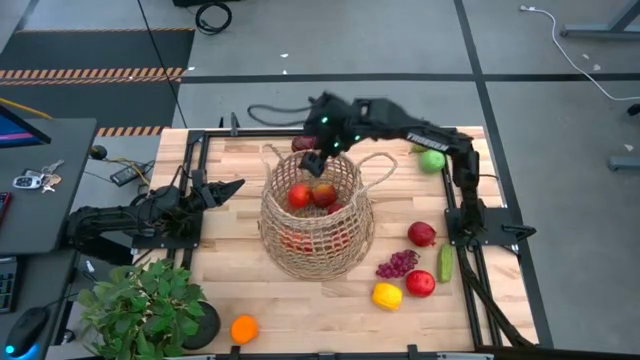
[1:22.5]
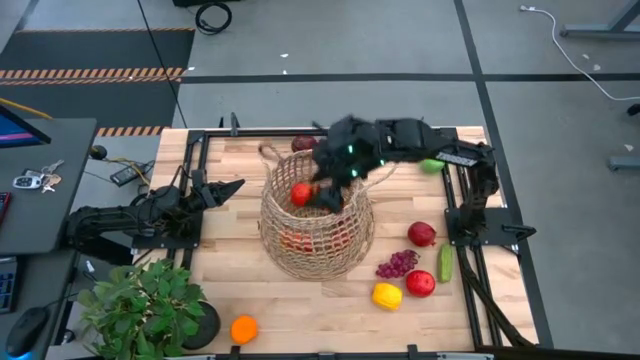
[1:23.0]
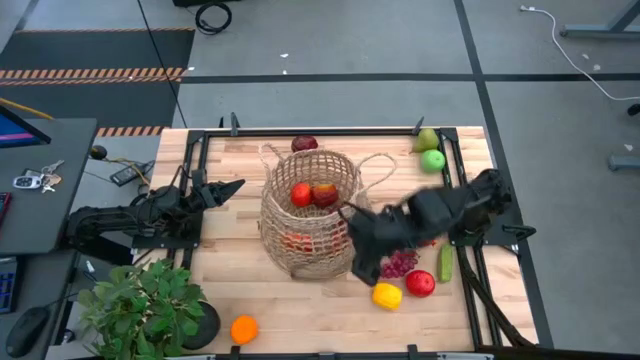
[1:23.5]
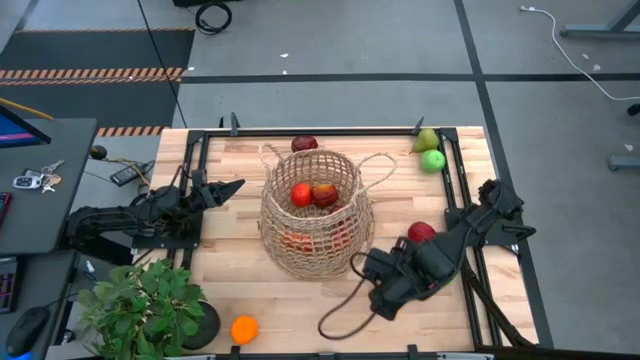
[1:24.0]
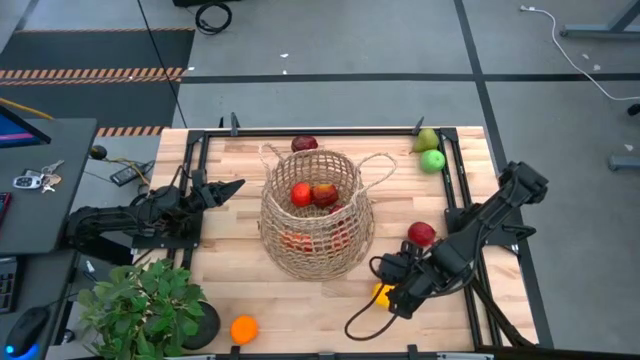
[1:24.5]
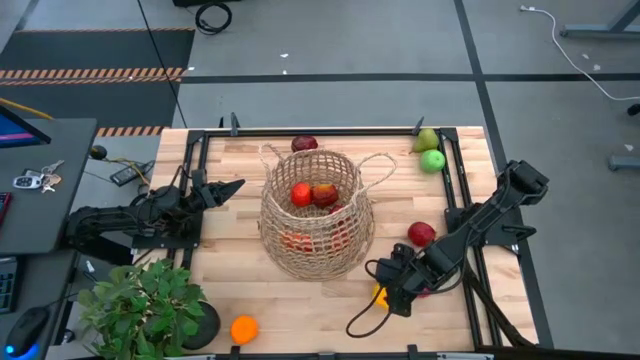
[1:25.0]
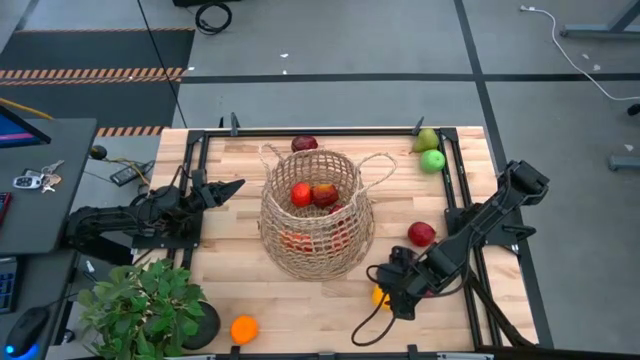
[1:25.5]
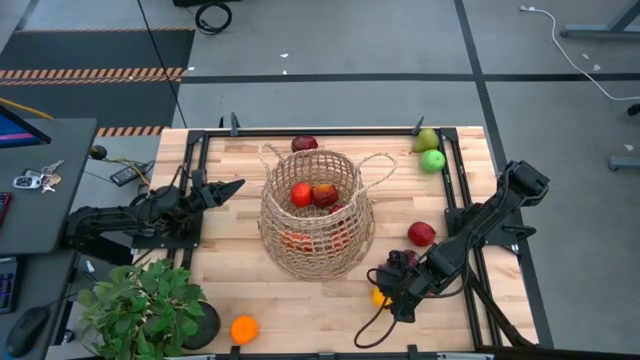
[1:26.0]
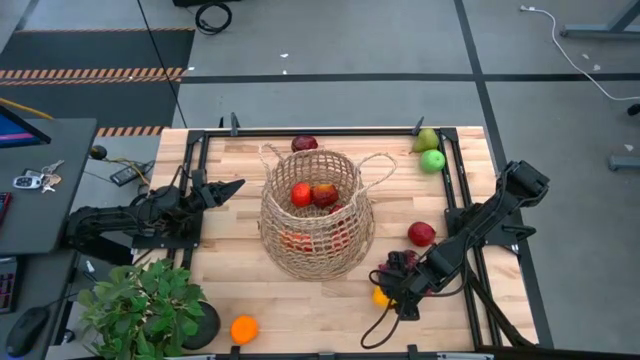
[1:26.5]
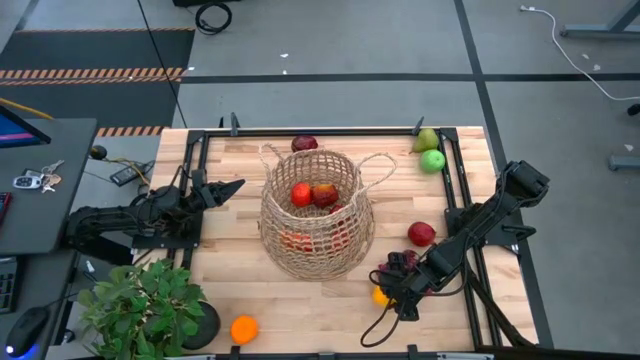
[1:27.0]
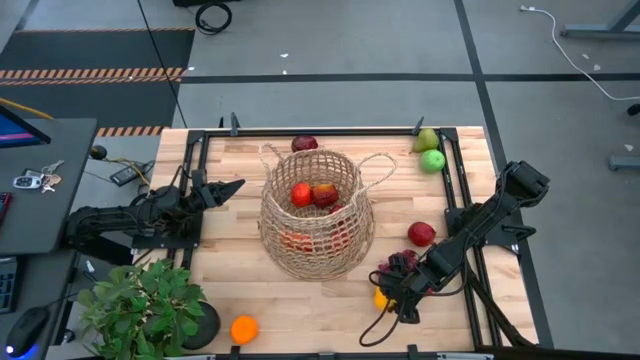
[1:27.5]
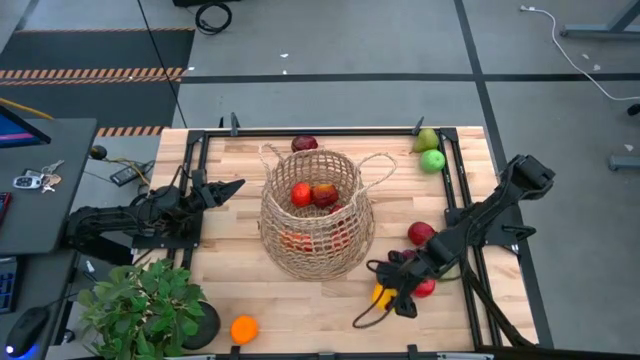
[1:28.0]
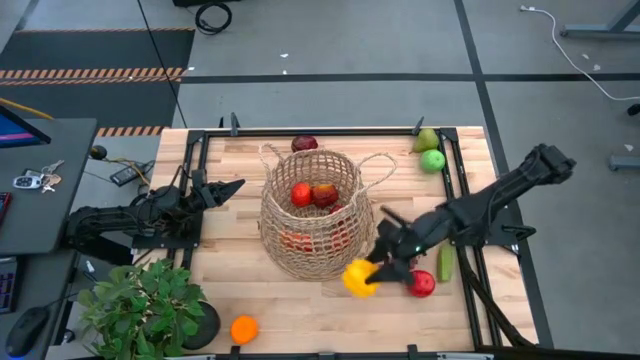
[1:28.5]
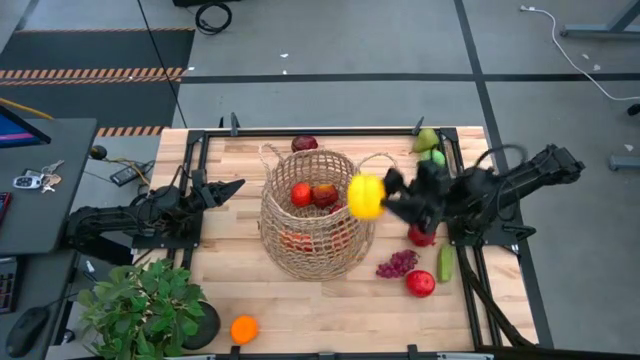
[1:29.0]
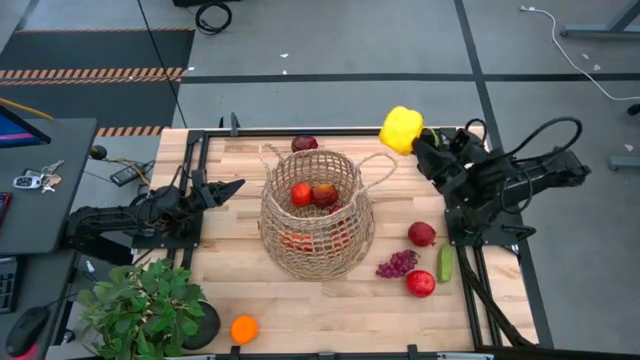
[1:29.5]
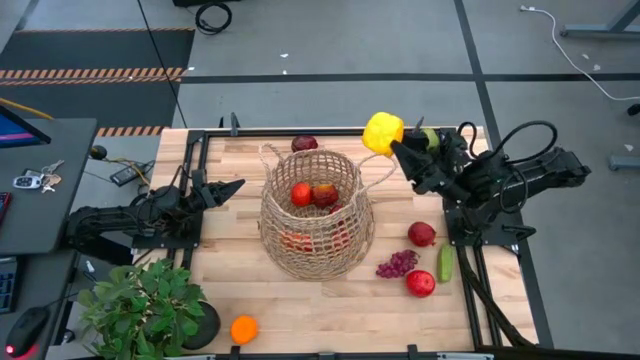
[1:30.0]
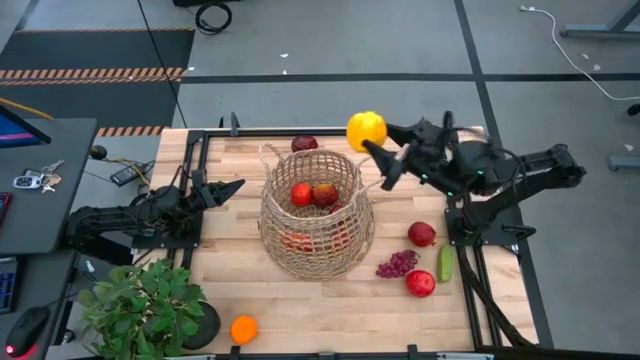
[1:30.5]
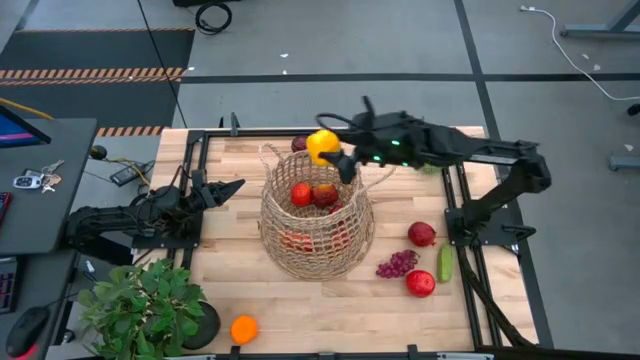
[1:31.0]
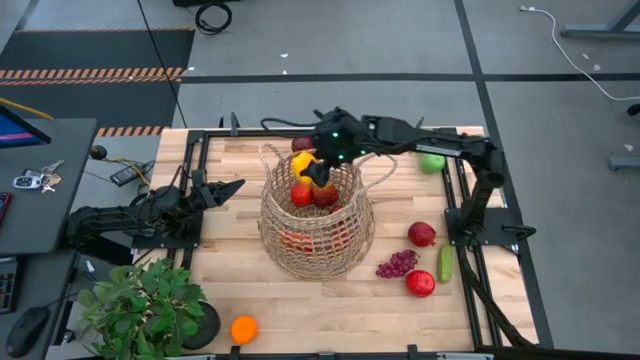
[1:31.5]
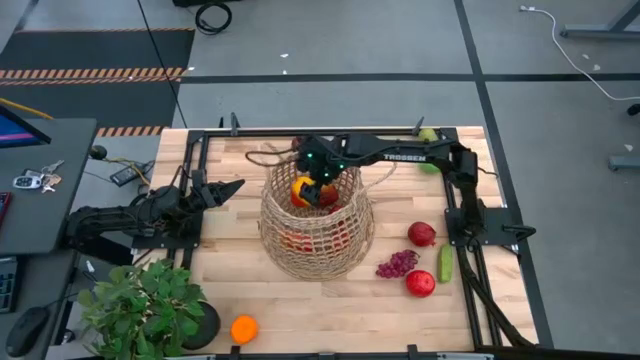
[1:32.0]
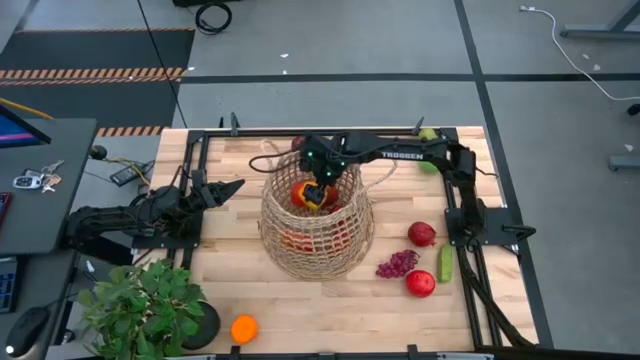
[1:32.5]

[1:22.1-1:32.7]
Task: Build produce basket
Put the yellow bell pepper into the basket

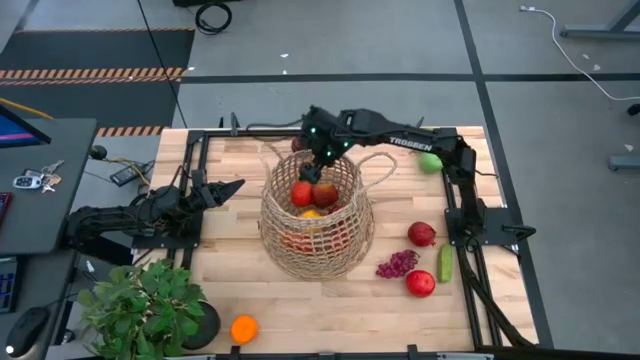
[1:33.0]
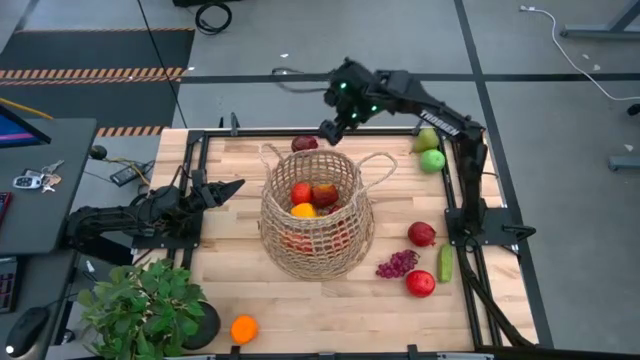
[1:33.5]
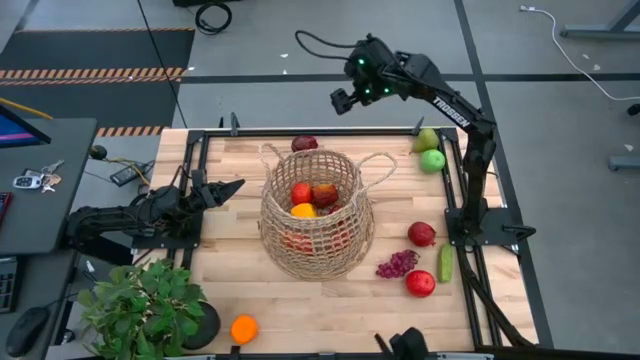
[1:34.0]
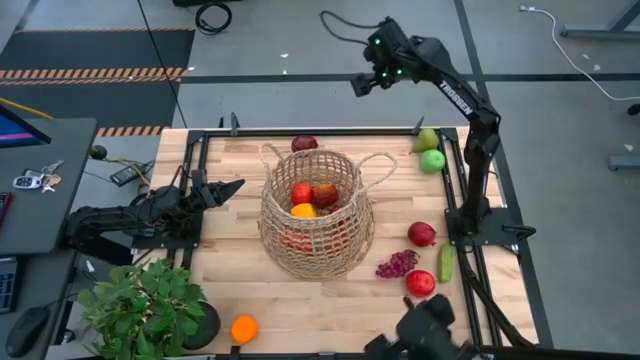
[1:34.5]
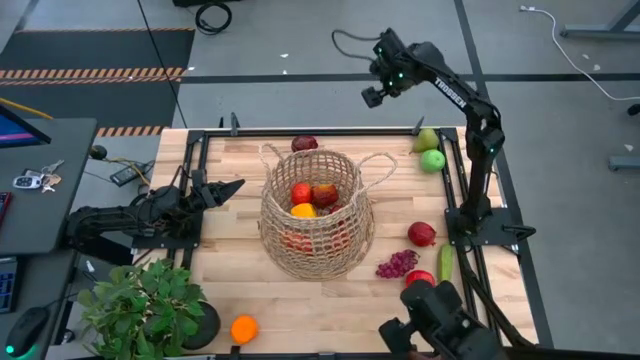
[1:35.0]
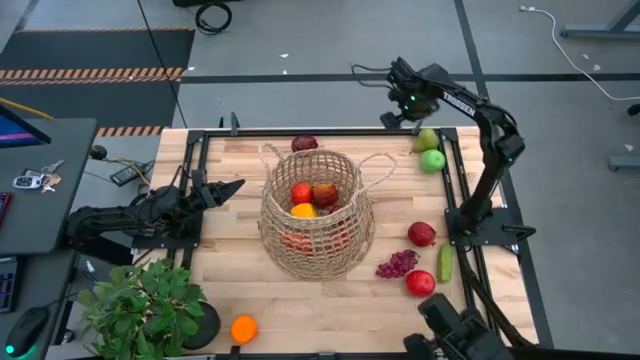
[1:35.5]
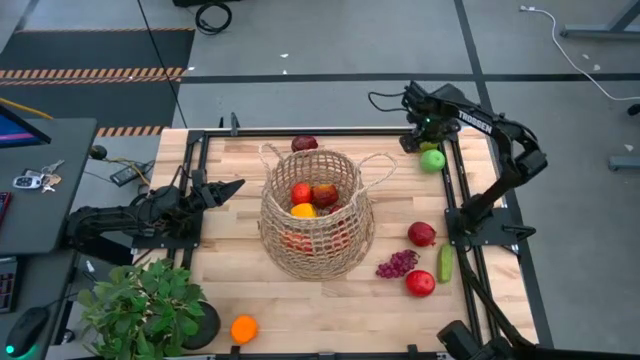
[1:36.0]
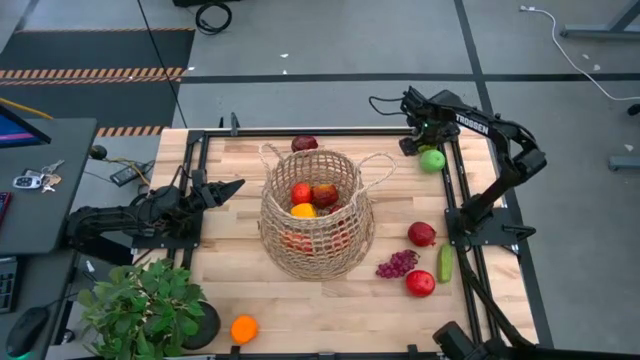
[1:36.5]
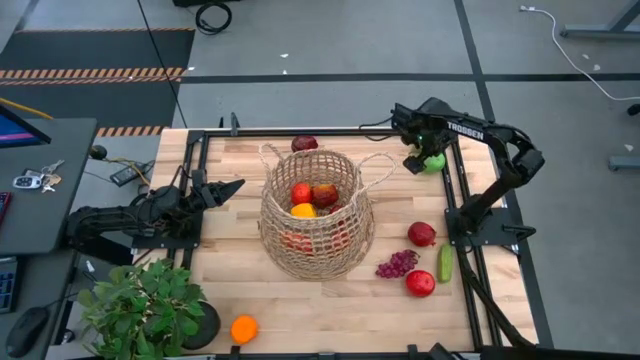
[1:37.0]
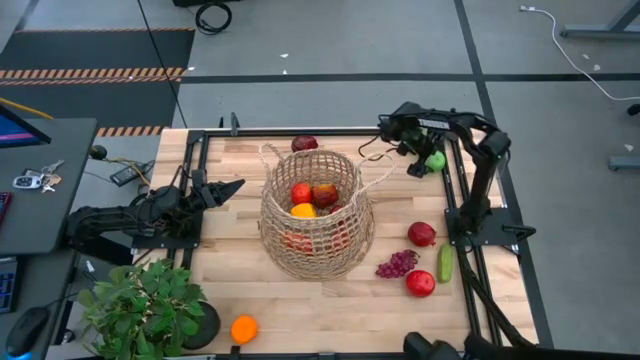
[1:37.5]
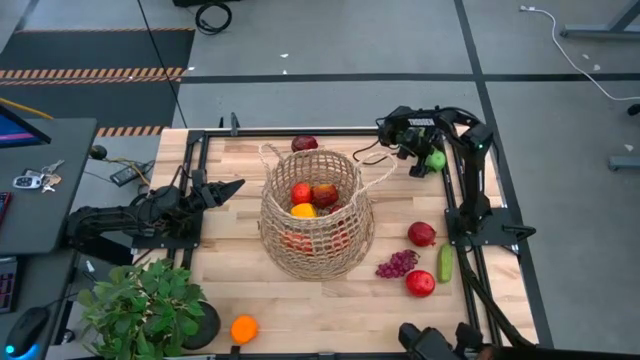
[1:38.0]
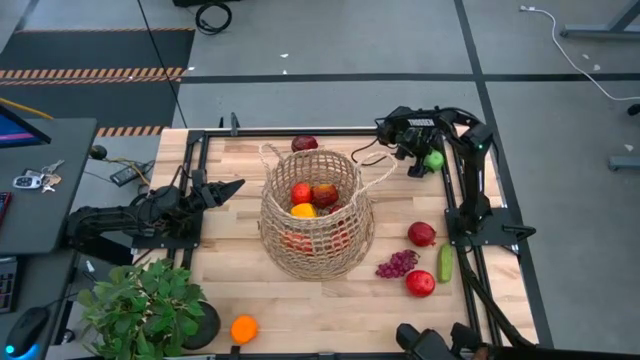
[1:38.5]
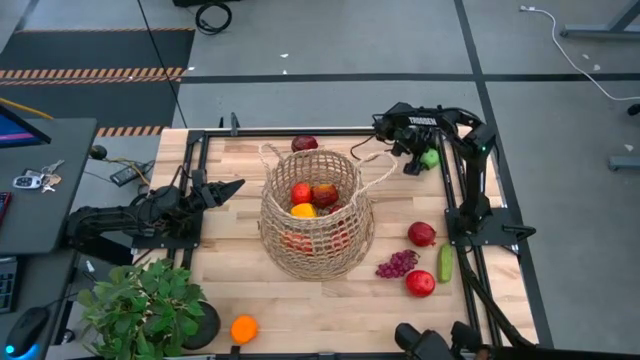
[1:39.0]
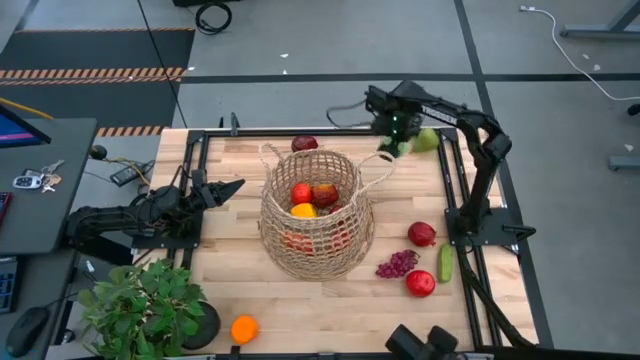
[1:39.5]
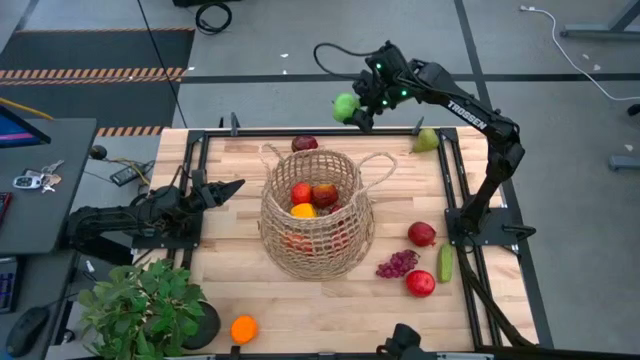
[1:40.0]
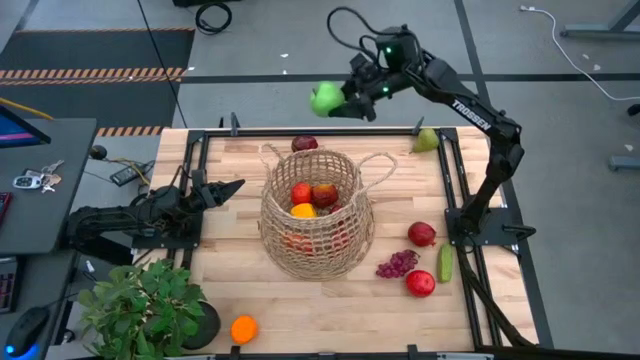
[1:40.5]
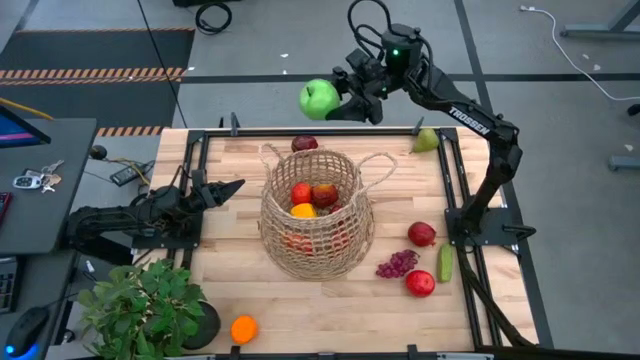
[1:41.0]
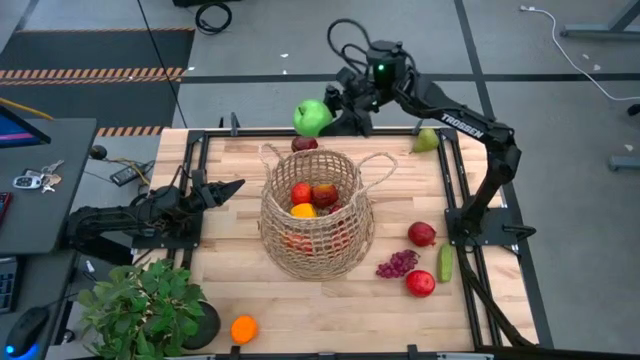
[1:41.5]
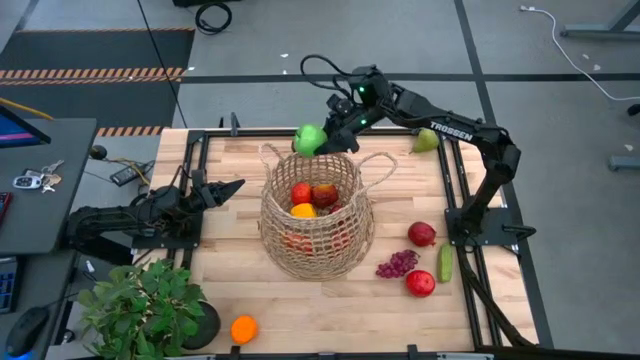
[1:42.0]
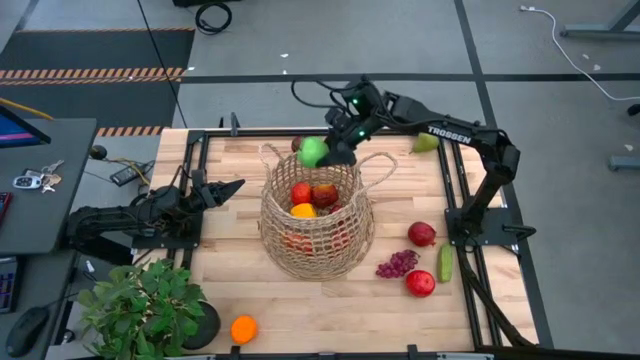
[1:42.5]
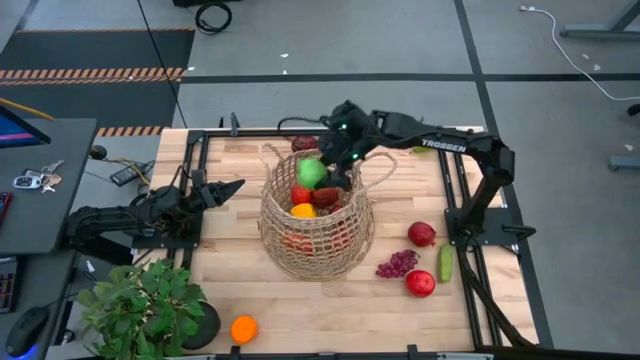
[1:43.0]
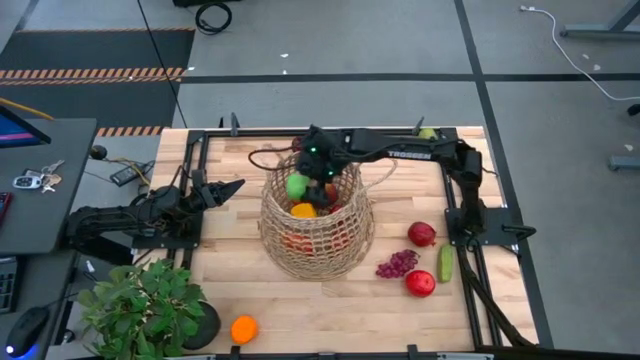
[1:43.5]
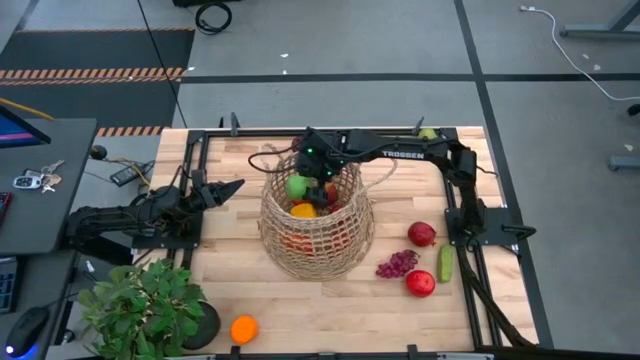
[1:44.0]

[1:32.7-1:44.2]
Put the green apple into the basket

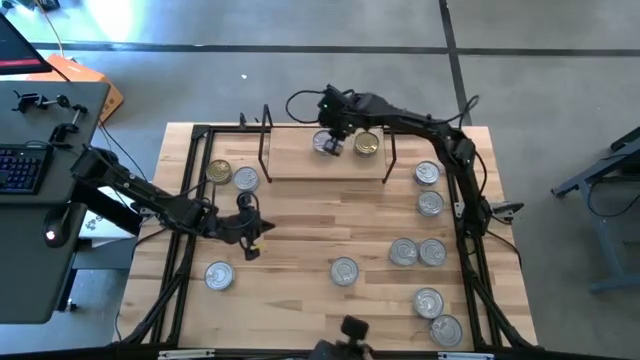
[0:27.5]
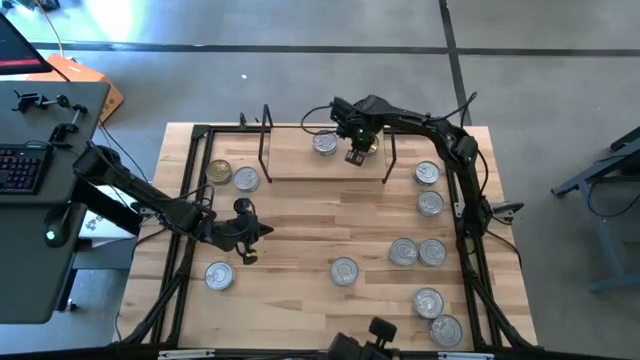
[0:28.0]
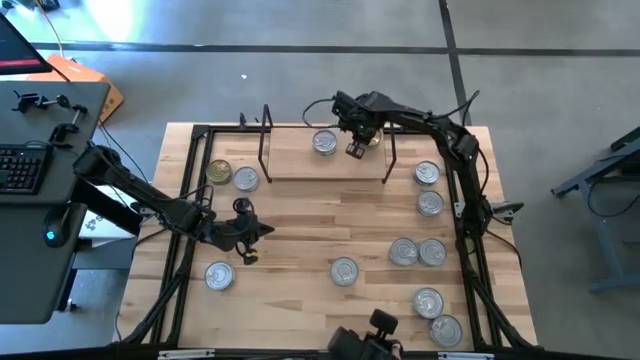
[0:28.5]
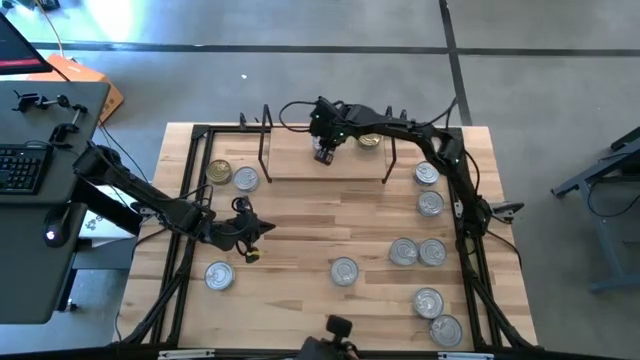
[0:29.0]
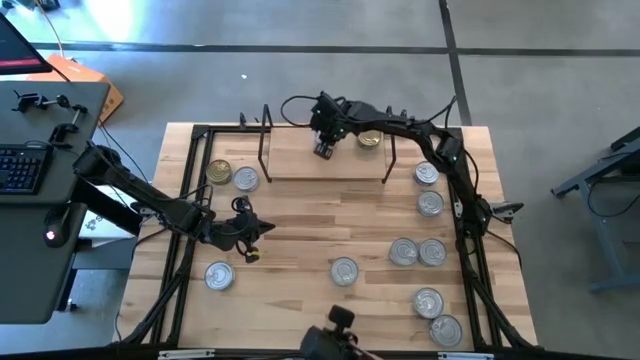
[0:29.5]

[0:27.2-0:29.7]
Task: Stack canned seafood by type on shelf
Adjust the tuna cans on the shelf
